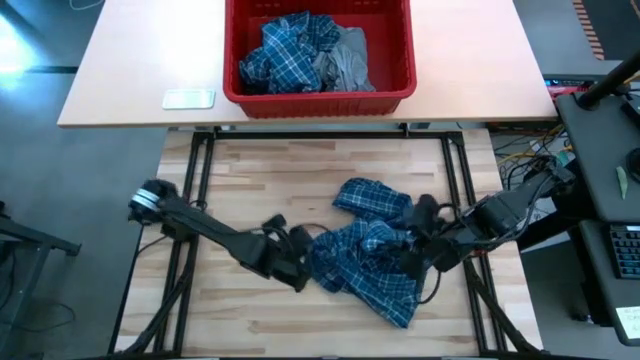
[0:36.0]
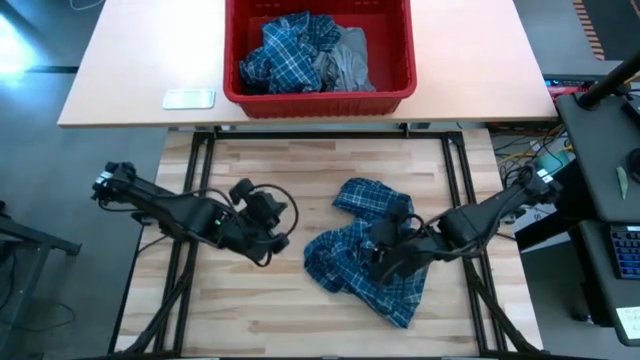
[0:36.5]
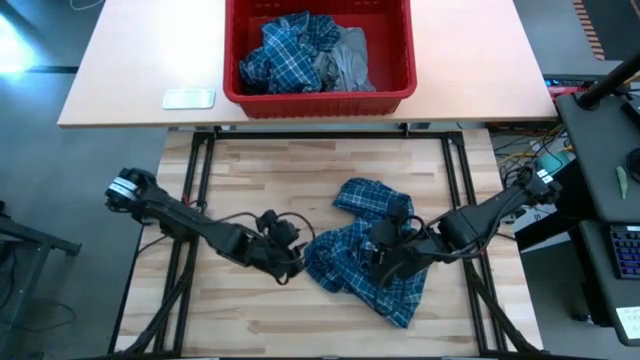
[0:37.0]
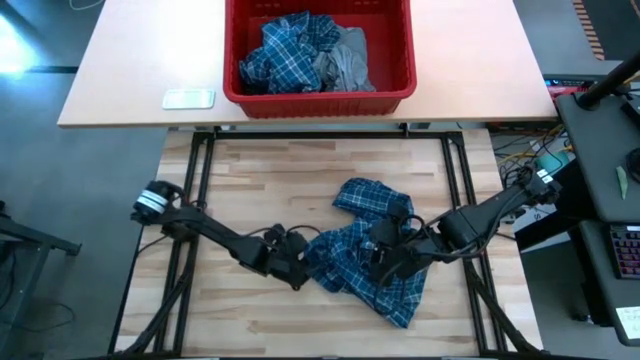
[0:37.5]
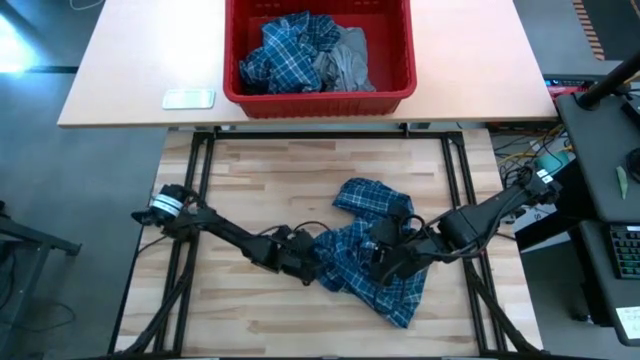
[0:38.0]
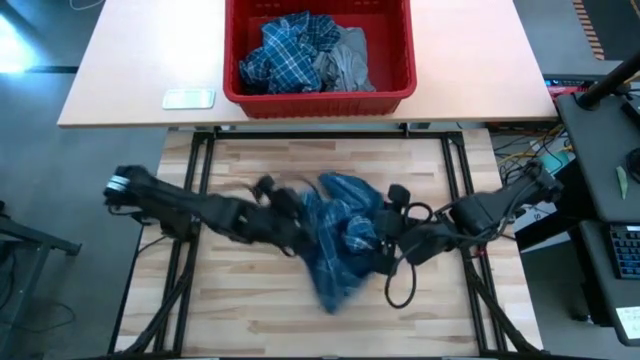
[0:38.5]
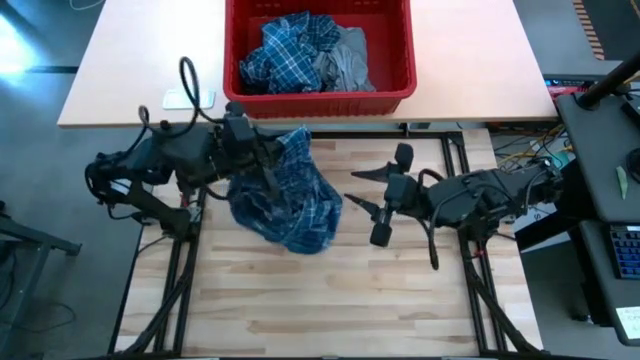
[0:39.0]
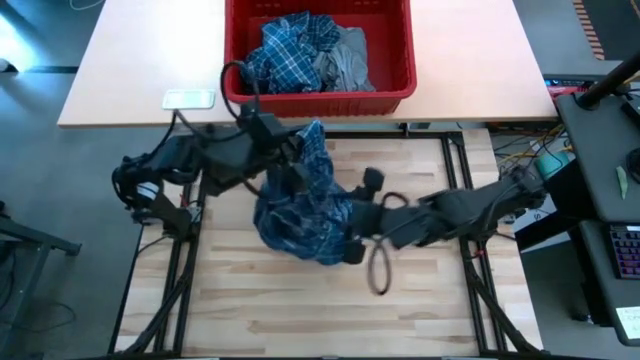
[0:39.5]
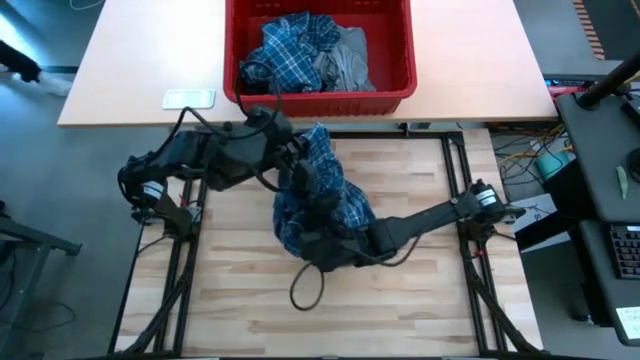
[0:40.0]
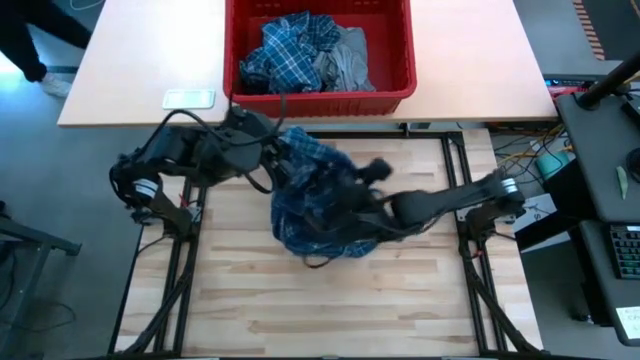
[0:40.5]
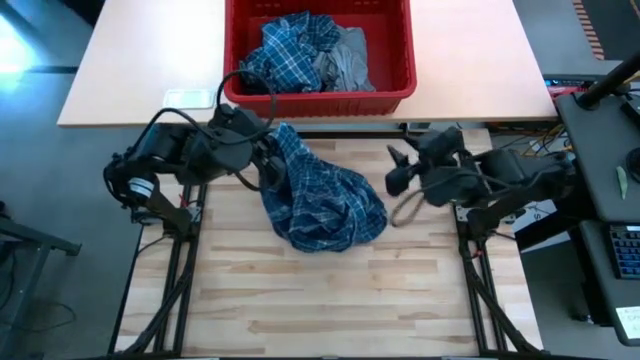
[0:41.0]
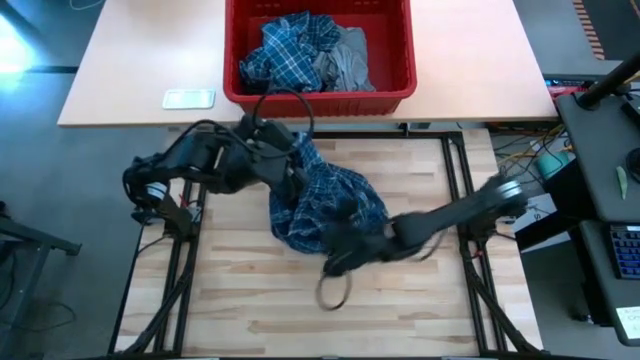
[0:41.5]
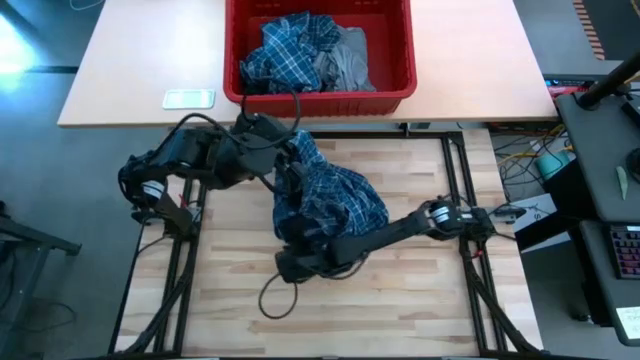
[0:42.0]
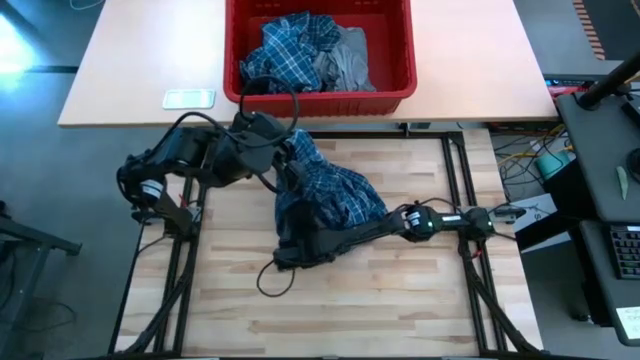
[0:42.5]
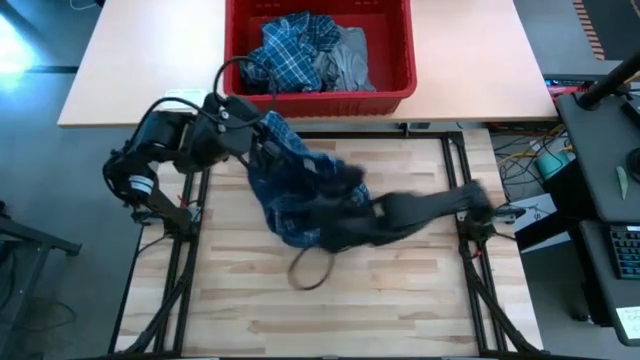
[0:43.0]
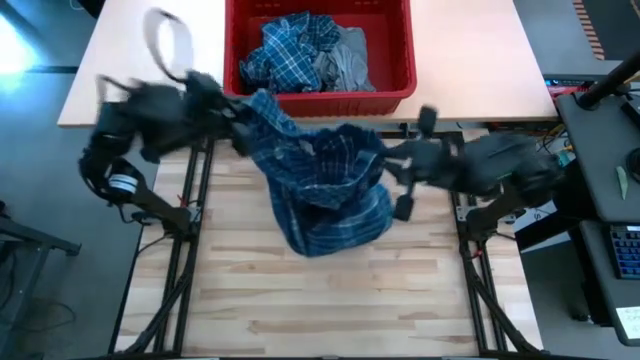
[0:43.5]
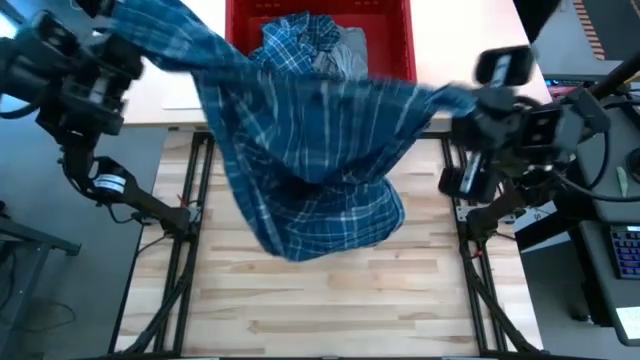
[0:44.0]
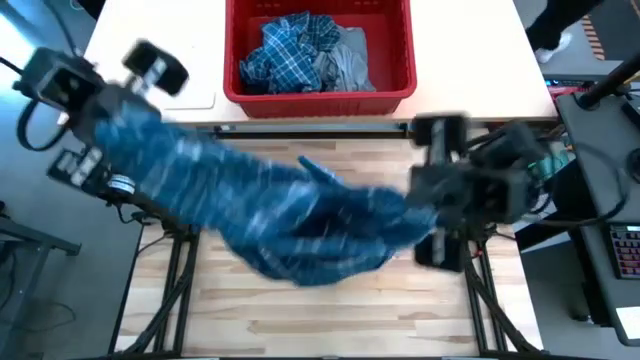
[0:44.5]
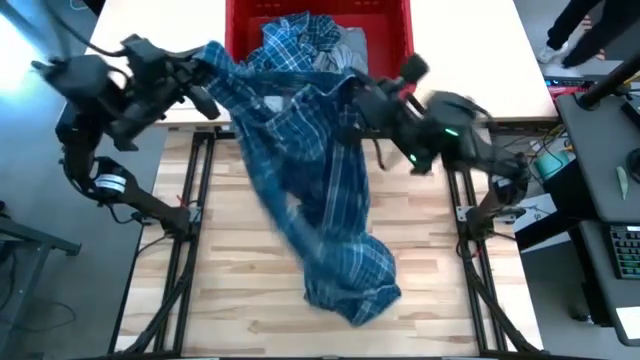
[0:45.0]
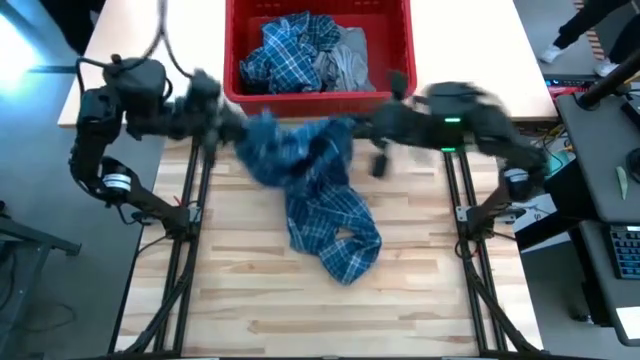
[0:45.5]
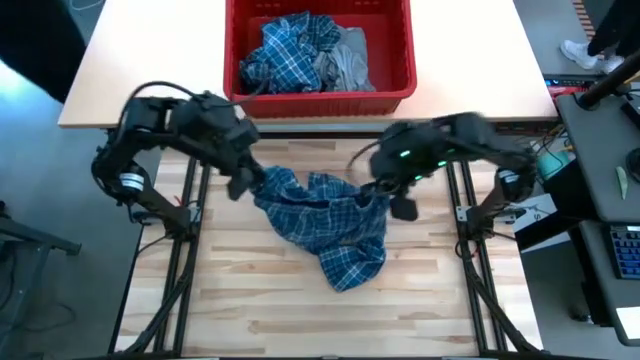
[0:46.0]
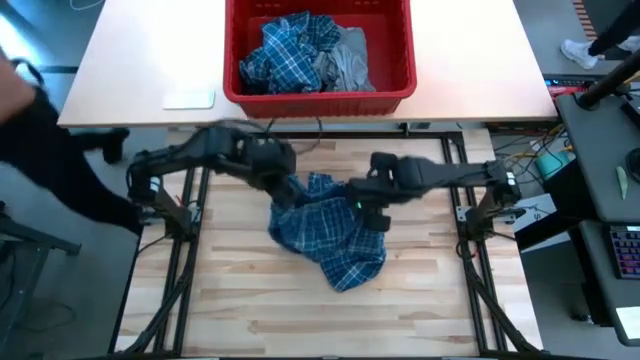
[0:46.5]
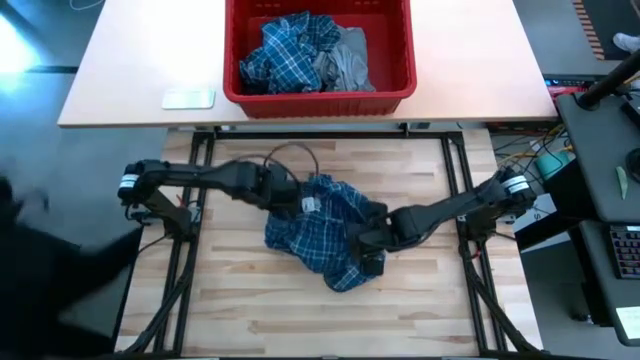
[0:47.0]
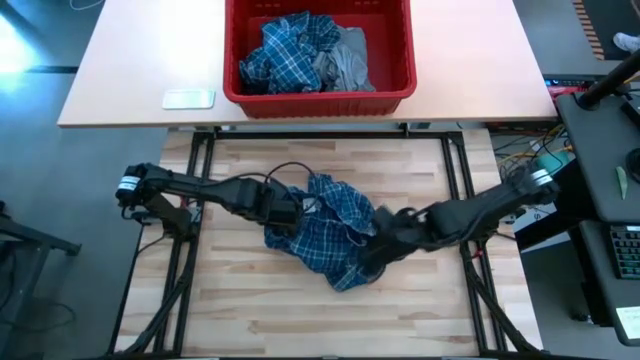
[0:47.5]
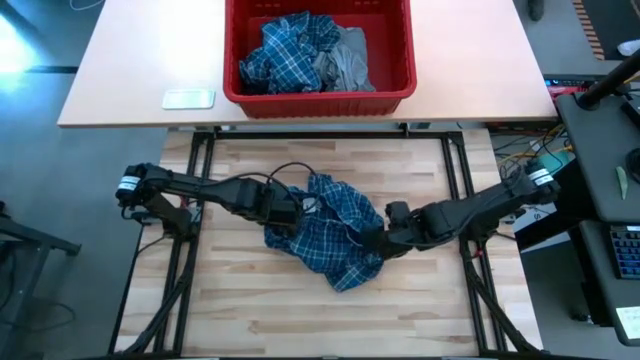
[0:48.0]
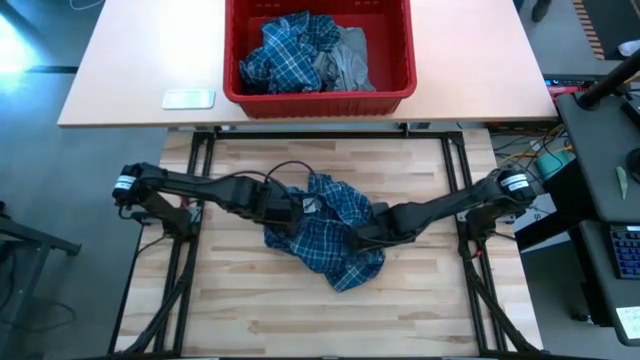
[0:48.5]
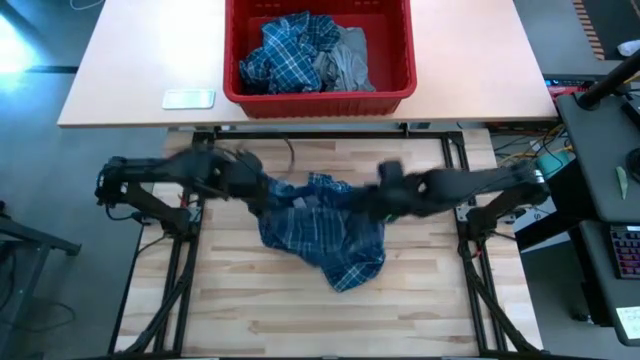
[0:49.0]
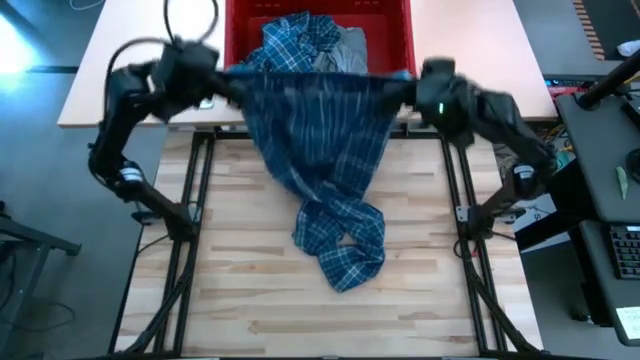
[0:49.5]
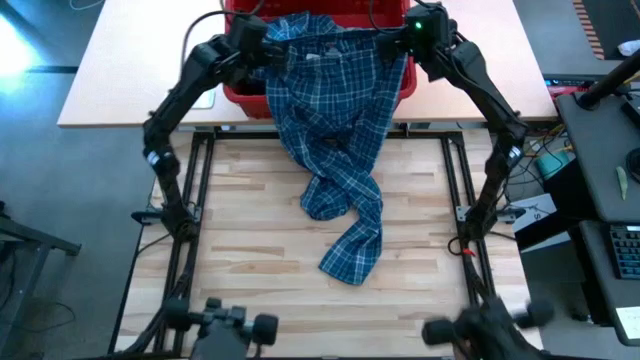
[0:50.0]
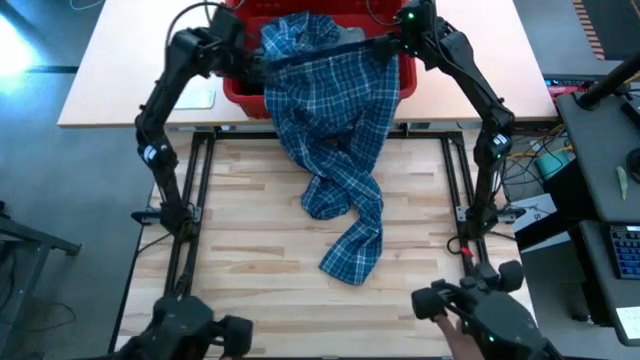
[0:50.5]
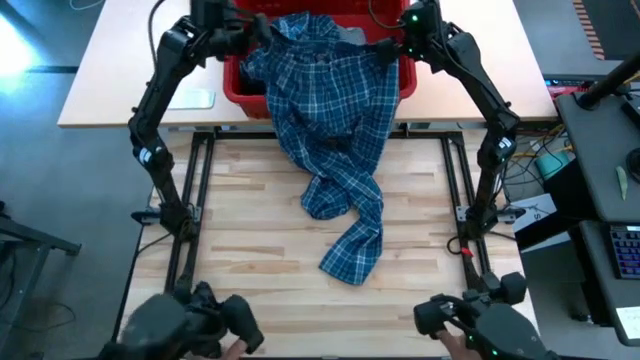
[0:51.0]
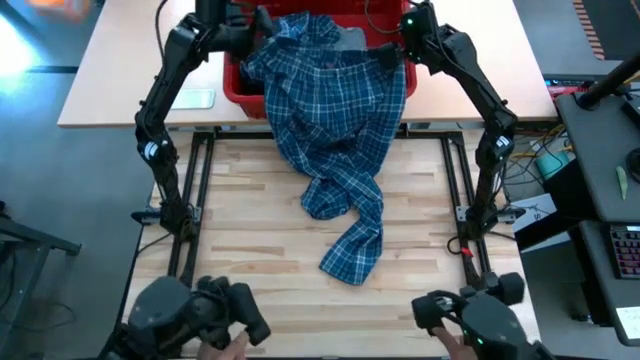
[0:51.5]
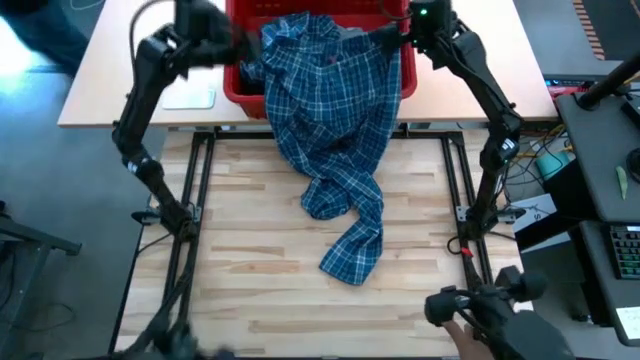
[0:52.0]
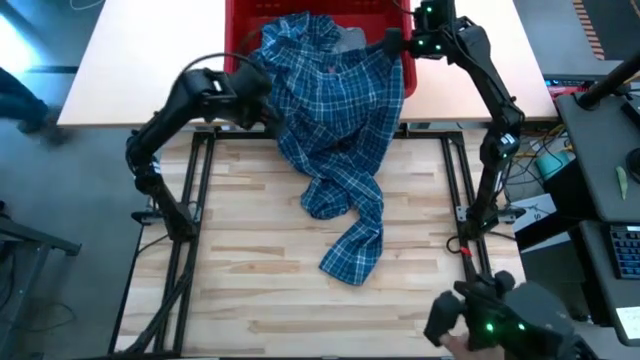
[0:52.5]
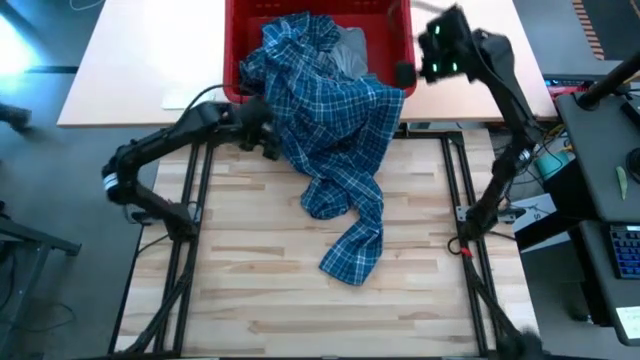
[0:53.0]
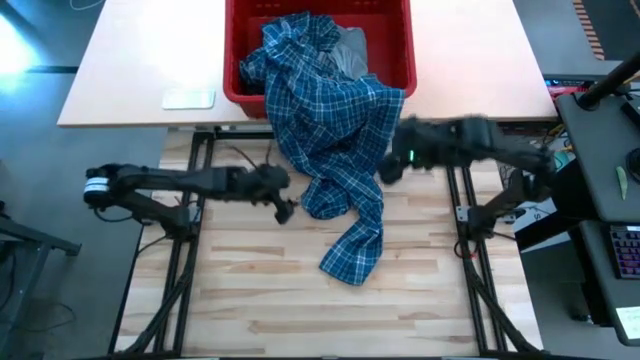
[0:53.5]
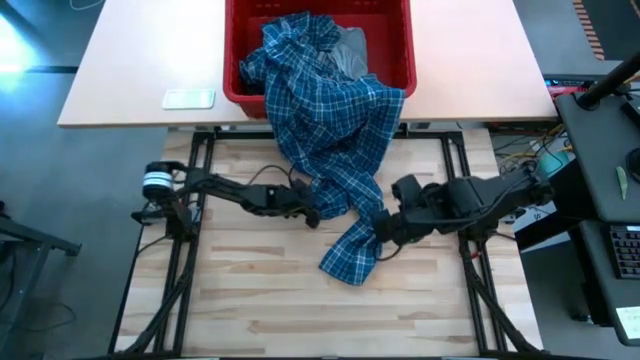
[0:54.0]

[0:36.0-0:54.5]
Task: Fold Laundry from Bin
Fold the blue patterned pants

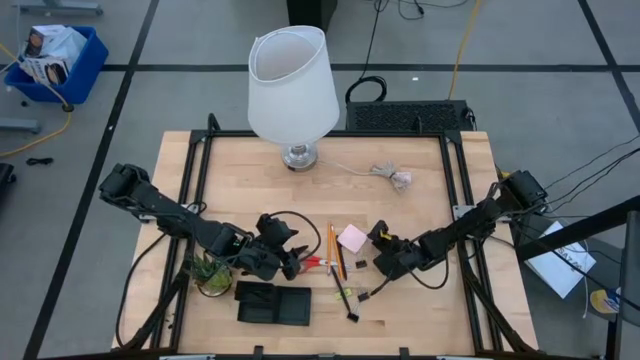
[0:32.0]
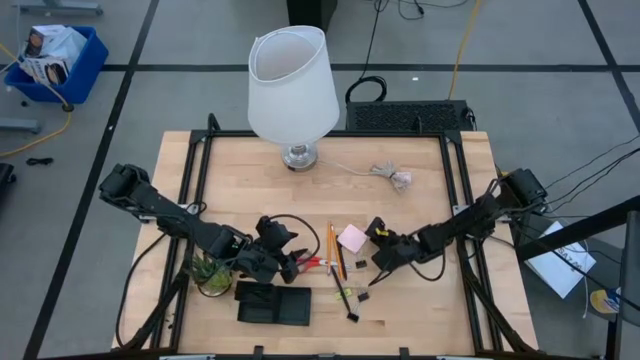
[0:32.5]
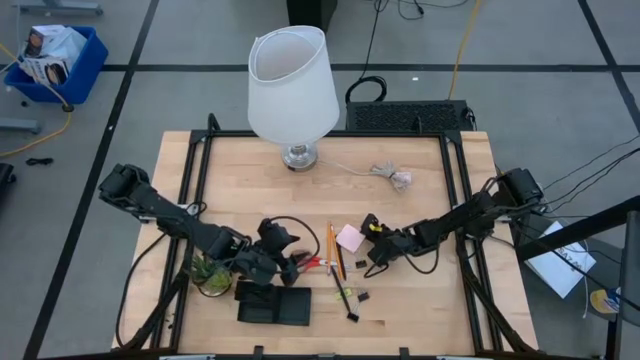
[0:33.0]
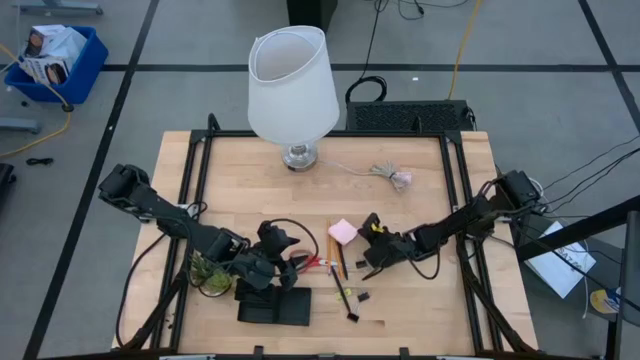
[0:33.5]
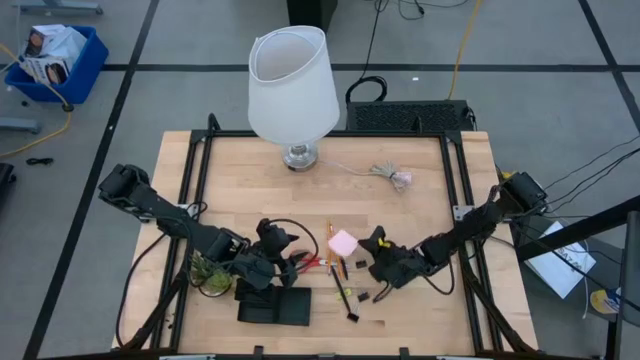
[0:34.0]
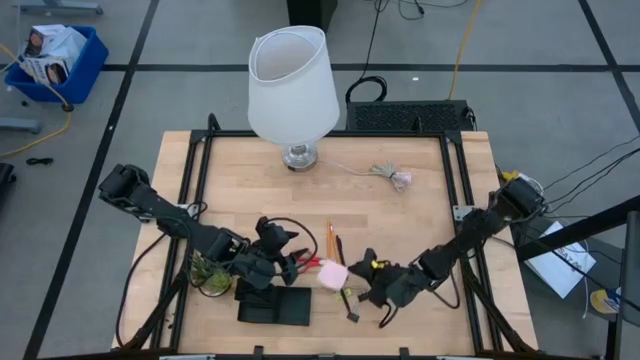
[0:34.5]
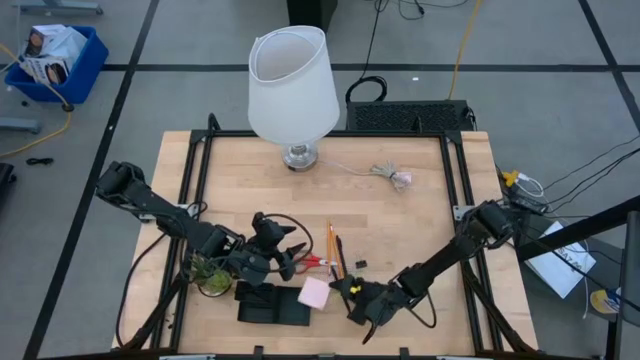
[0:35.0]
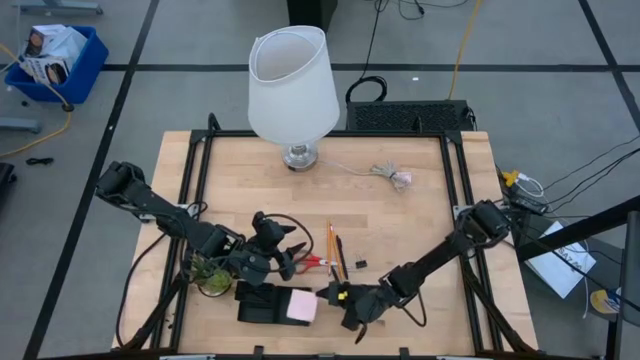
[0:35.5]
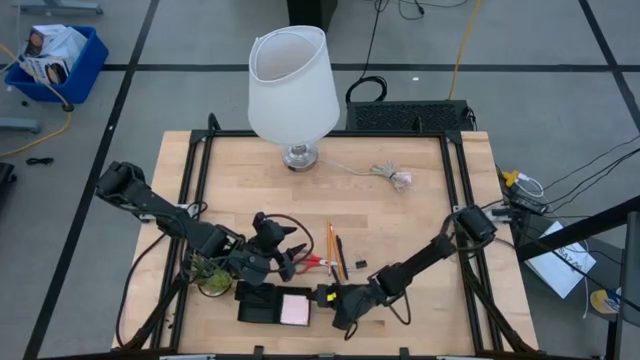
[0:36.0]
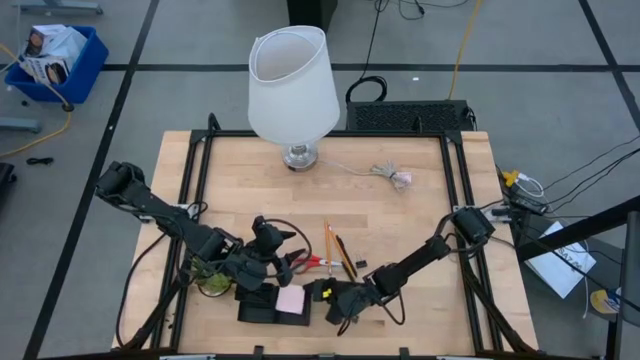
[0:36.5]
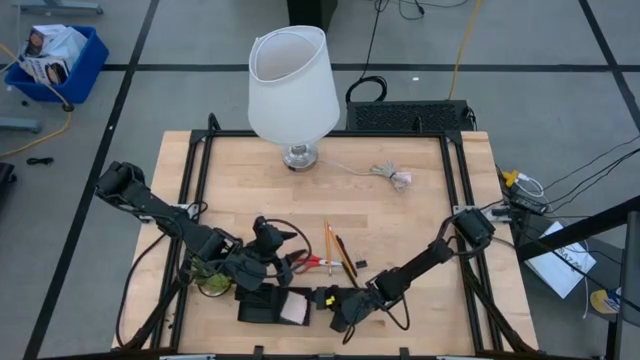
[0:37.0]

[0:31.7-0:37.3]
Task: Pick and place office supplies into organizer
Put the pink sticky note into the black desk organizer
